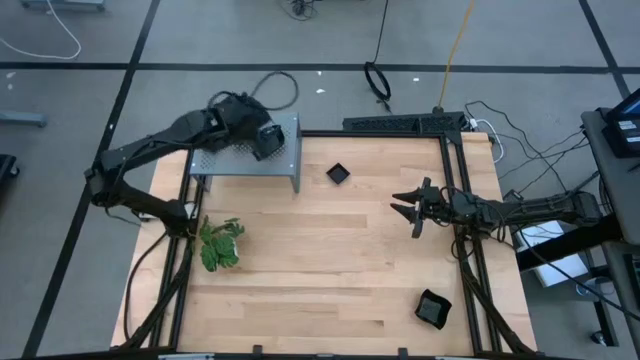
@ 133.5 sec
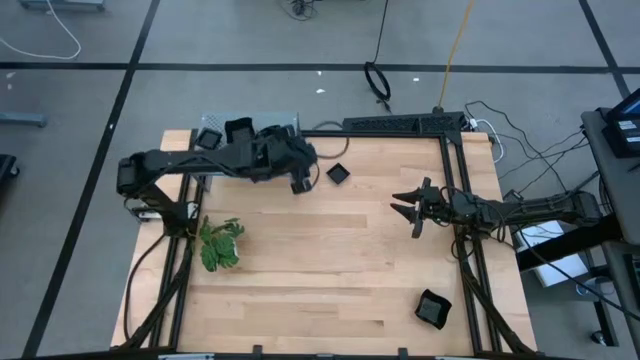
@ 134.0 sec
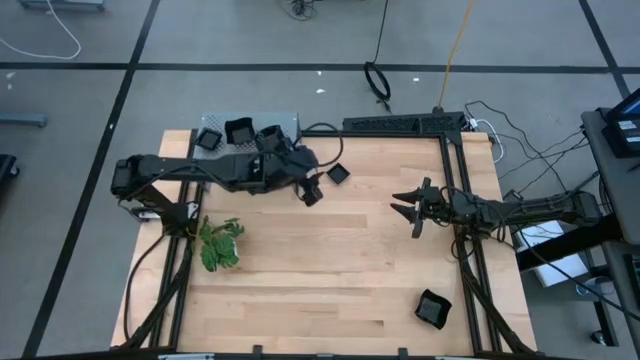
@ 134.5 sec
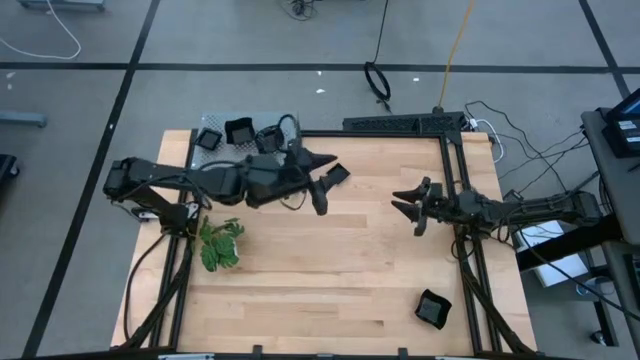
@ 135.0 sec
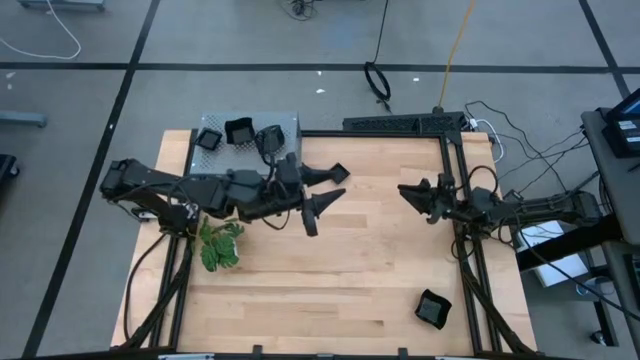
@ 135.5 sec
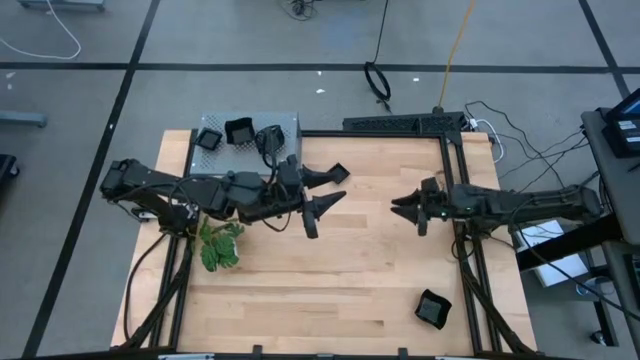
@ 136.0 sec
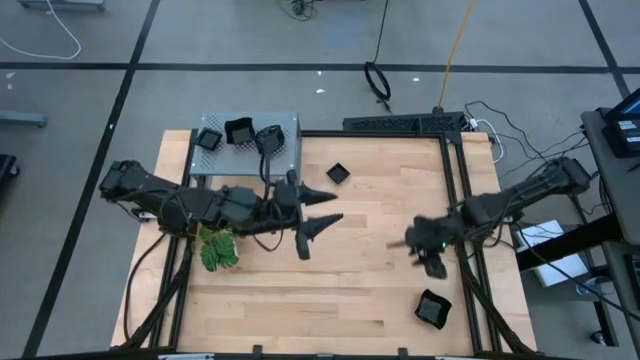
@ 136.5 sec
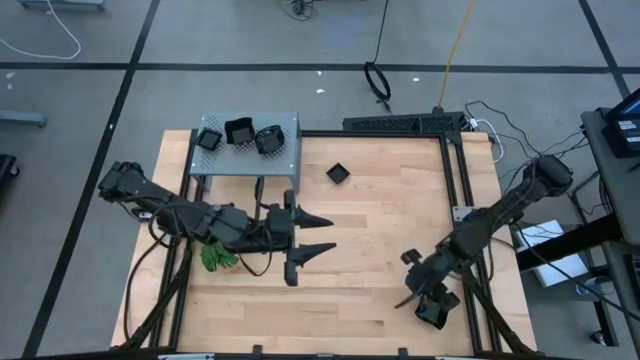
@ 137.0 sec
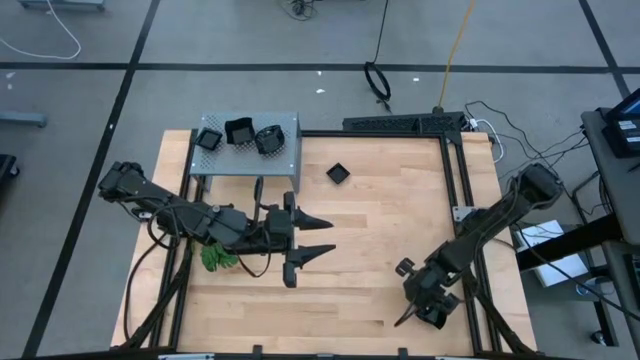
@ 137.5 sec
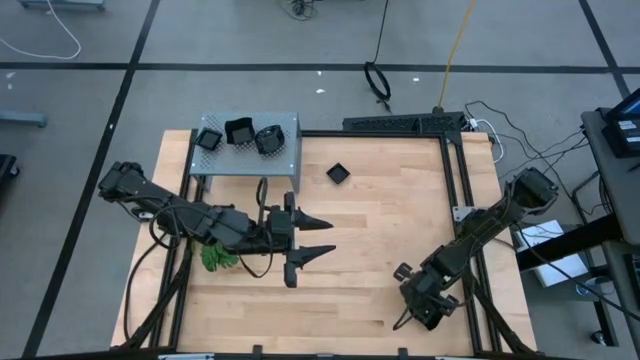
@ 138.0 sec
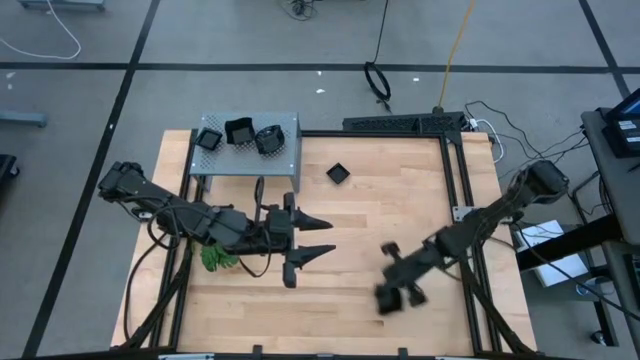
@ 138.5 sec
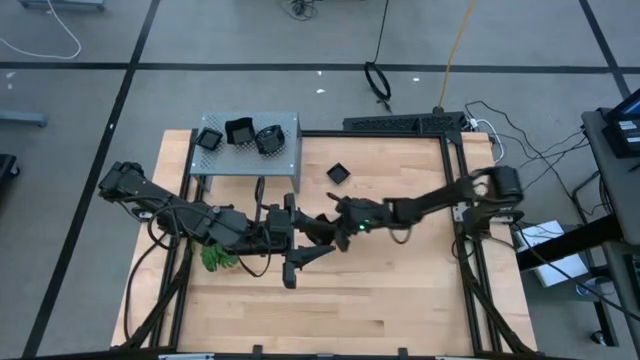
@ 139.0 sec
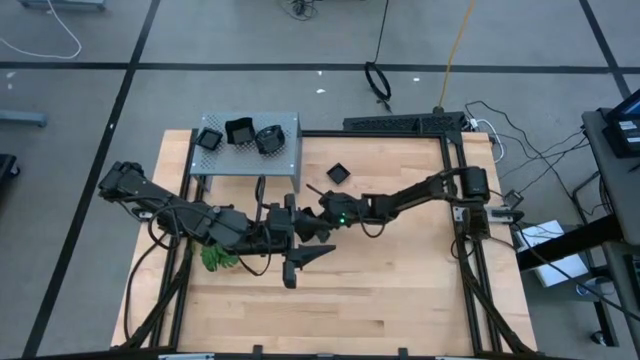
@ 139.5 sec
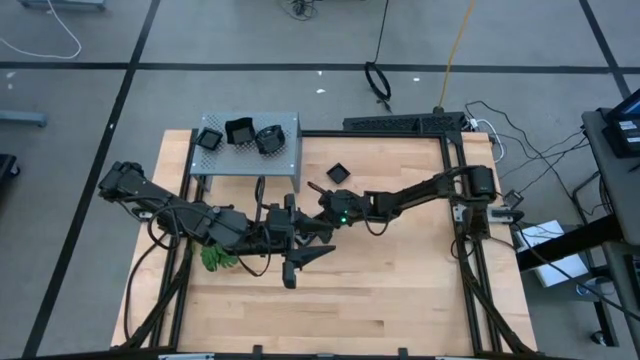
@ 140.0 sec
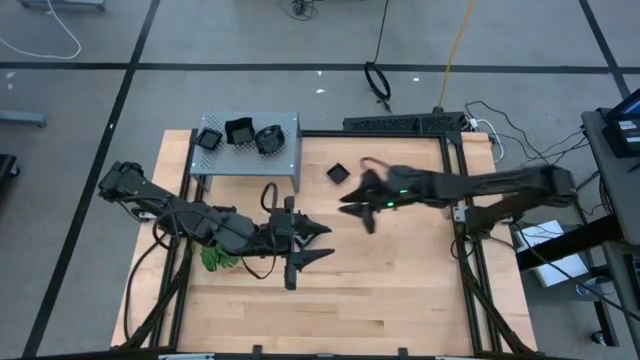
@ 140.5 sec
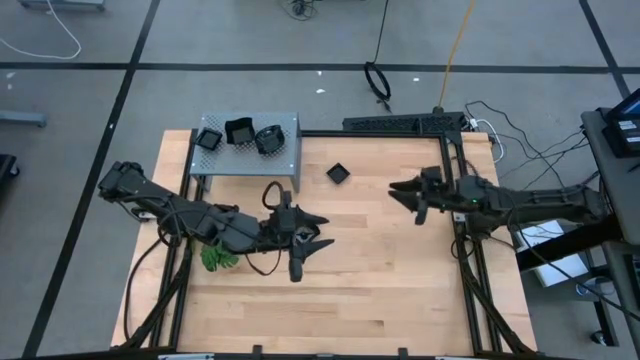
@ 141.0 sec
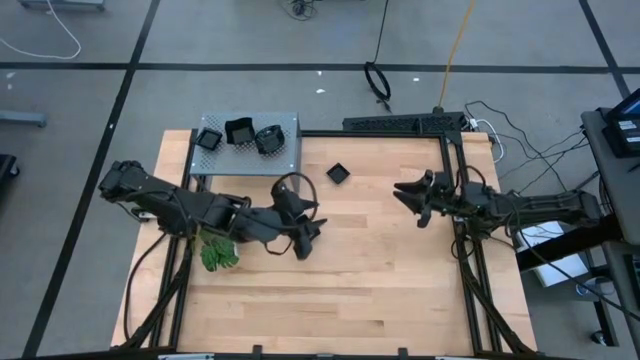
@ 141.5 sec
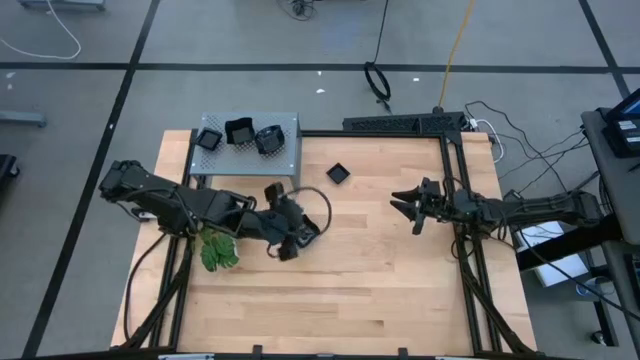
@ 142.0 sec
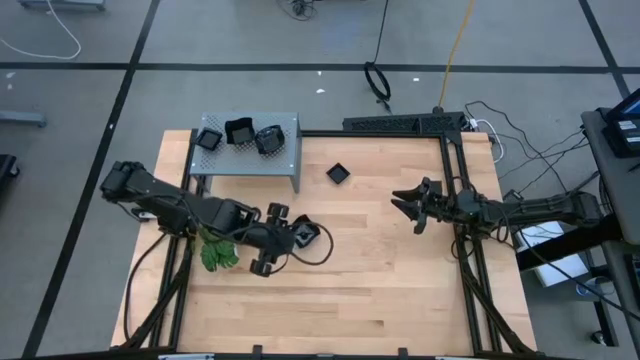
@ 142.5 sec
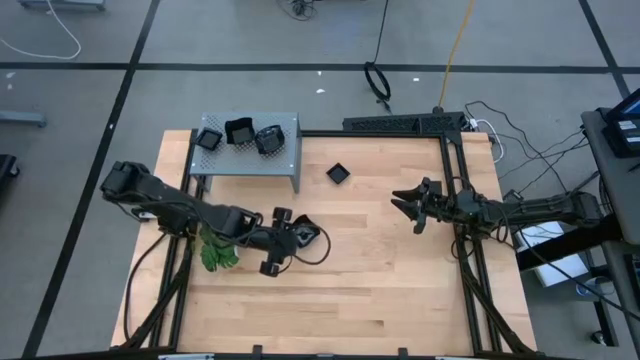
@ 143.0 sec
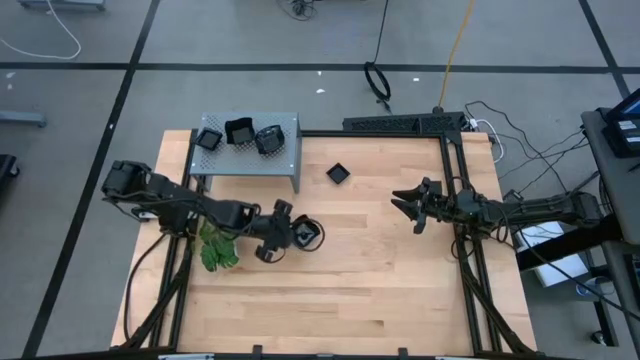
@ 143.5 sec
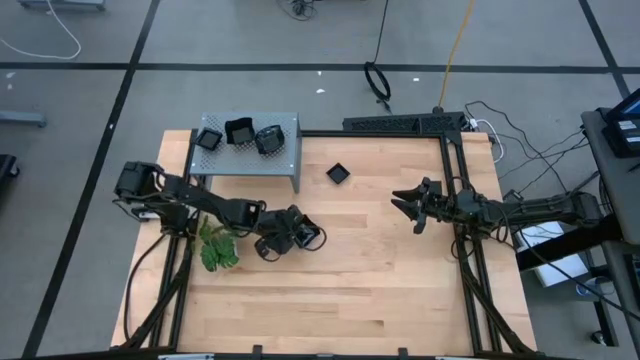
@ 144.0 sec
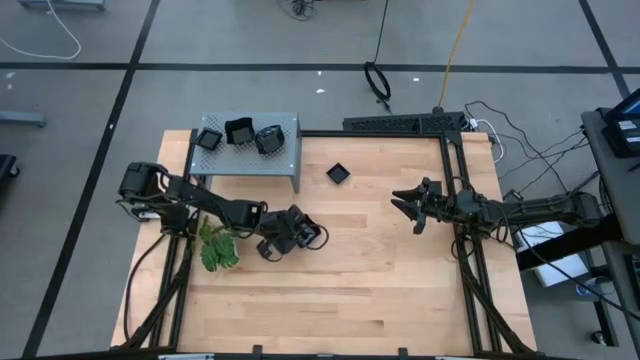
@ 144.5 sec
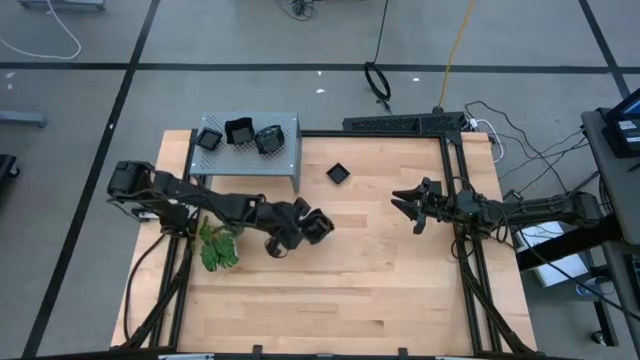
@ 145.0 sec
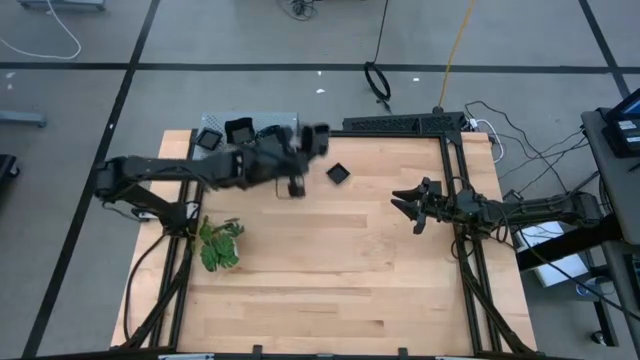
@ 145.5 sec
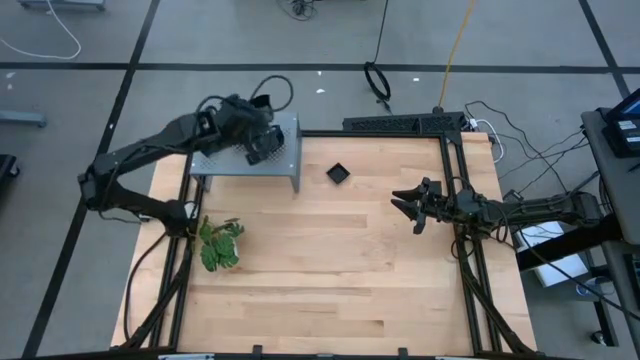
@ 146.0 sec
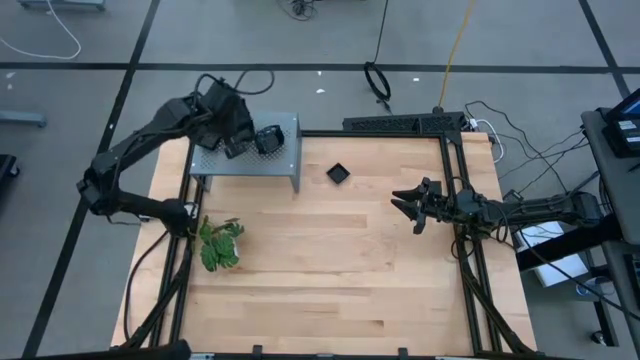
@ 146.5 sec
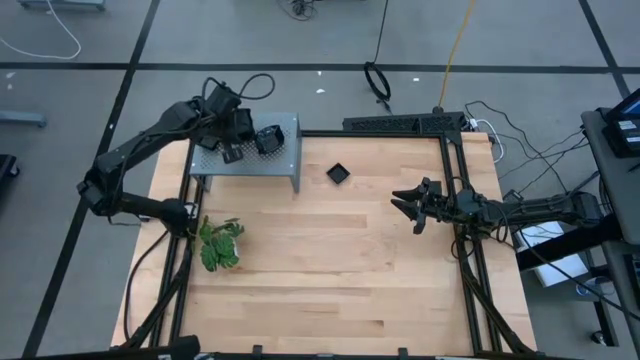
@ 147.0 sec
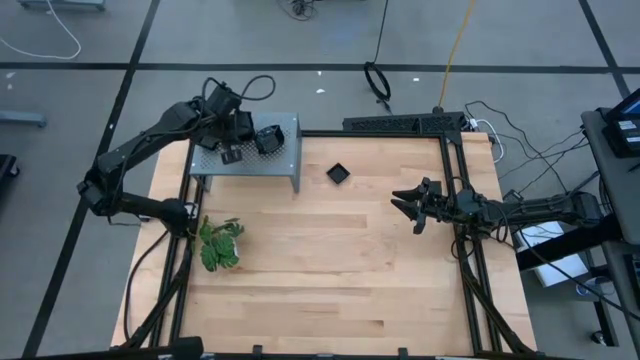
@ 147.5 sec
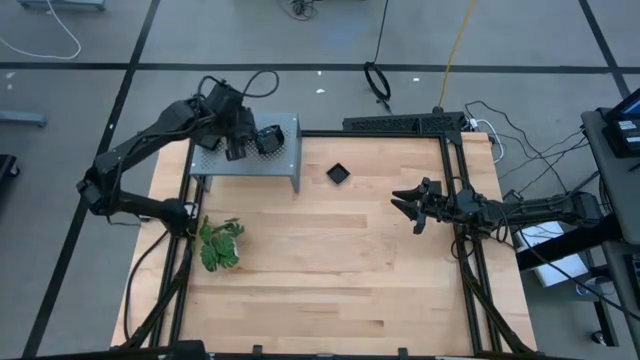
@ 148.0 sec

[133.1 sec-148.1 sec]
Task: Pick & Place Mini shaped plates
Stack the distorted square plate on top of the distorted square plate on the shelf

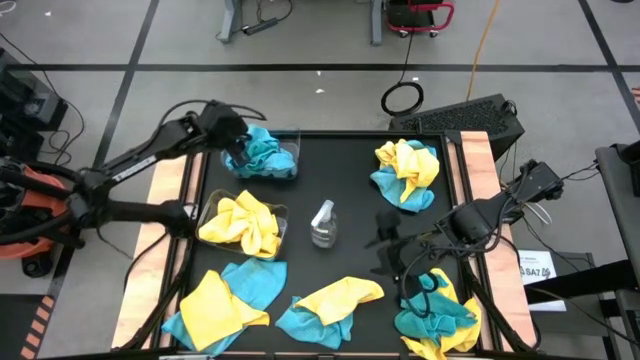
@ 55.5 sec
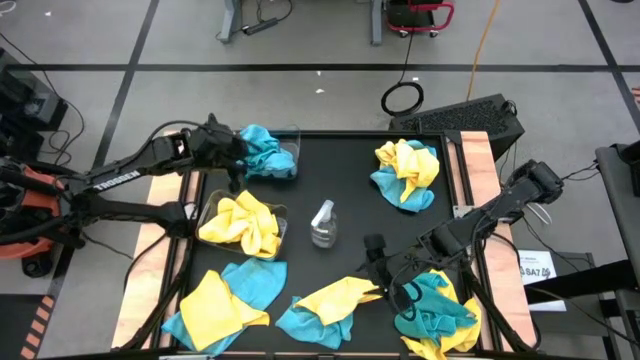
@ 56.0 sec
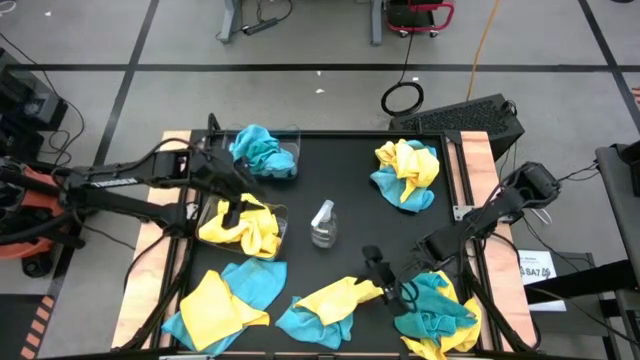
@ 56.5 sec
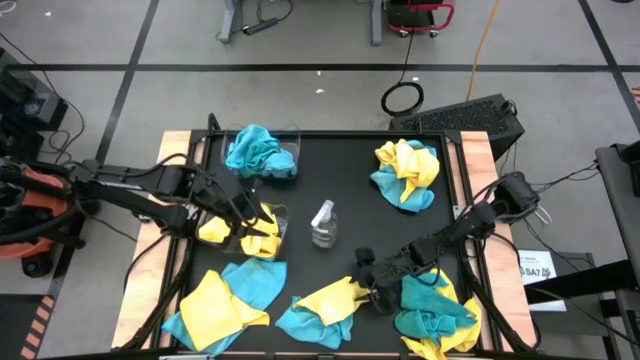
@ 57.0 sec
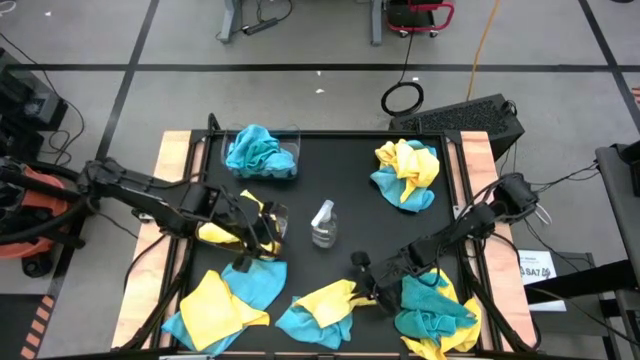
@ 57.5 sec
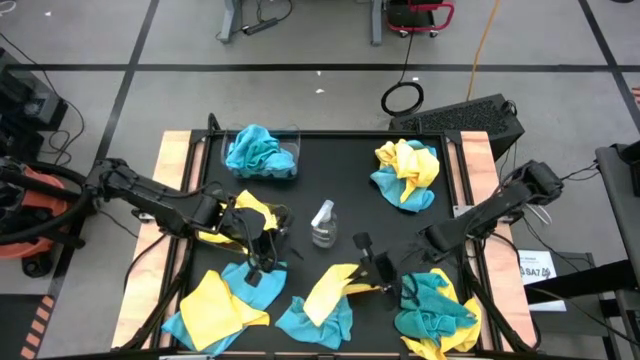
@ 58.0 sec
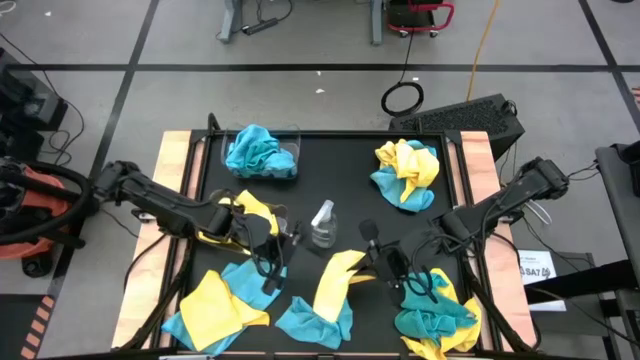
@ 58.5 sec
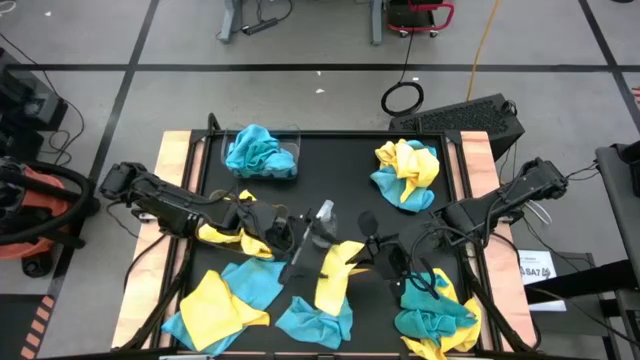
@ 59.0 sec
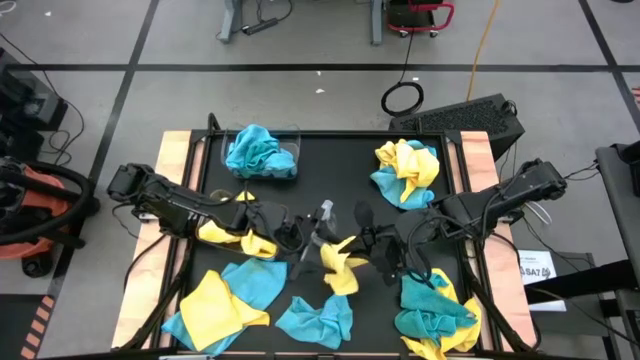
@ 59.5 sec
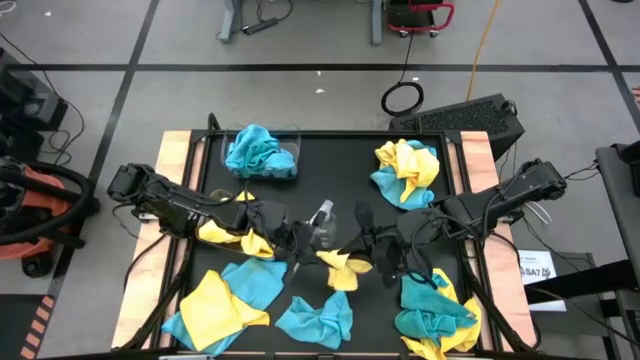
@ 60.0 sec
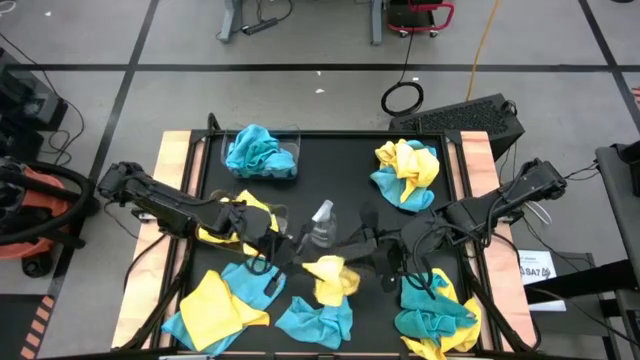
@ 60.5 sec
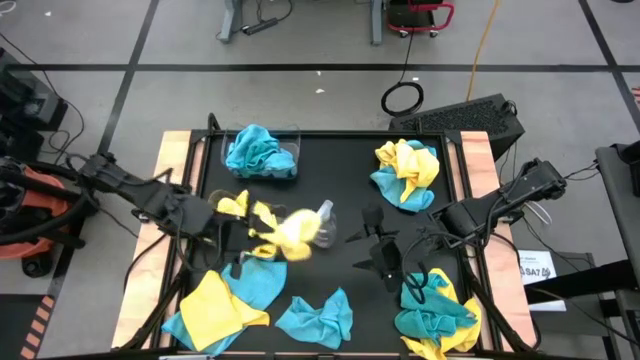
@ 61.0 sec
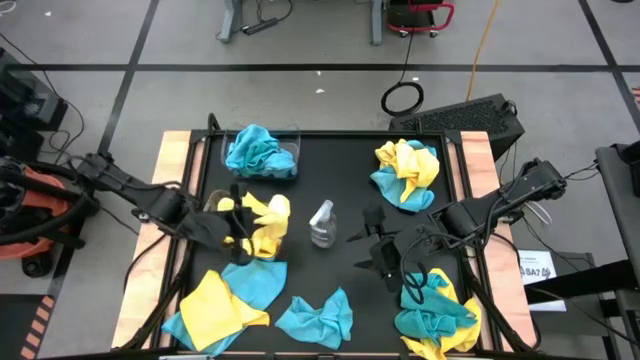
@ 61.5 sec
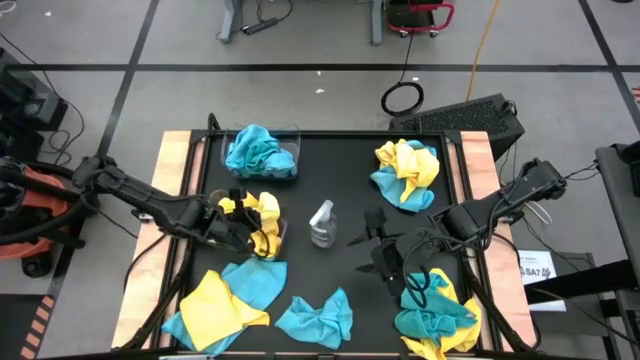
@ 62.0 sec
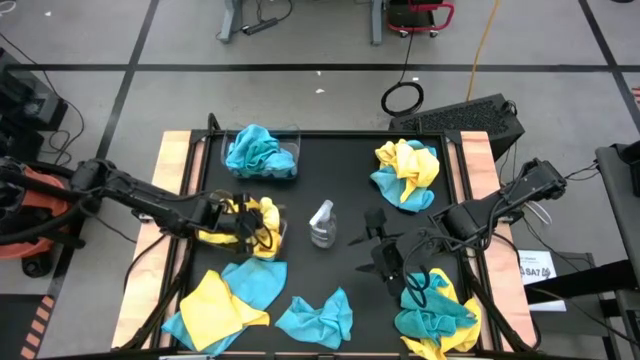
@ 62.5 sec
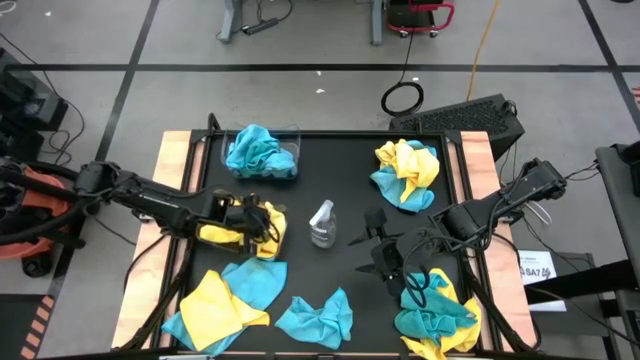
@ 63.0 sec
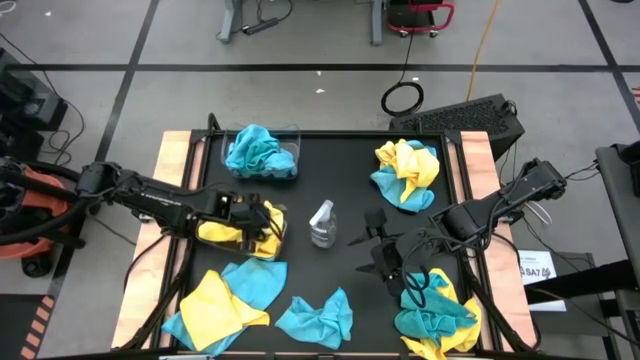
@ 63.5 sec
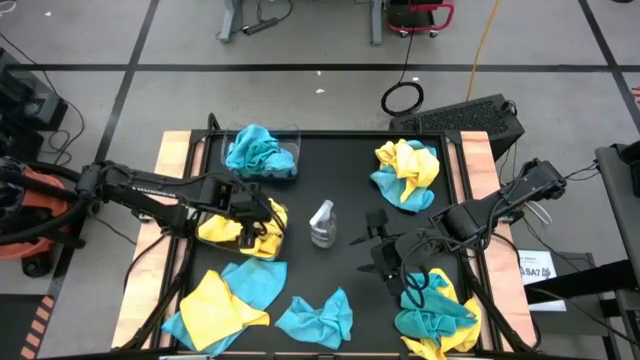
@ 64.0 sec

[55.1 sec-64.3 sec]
Task: Sort microfiber towel by color & place in baskets
Put the yellow microfiber cloth into the bottom transparent bin
